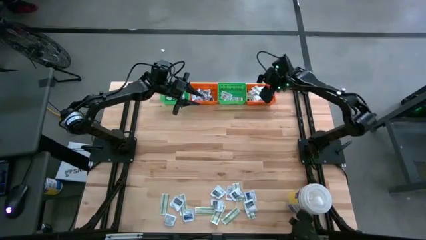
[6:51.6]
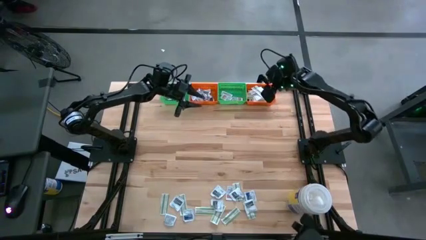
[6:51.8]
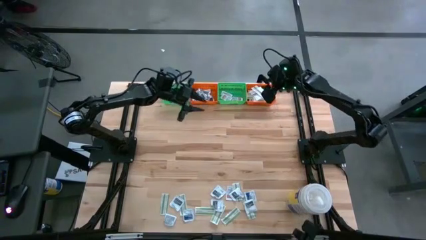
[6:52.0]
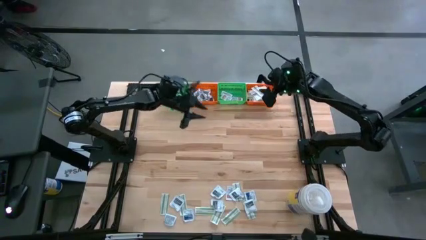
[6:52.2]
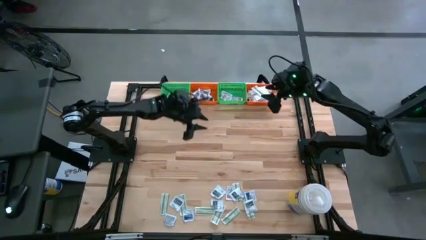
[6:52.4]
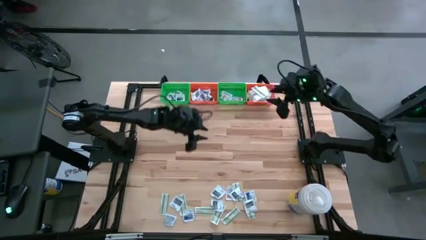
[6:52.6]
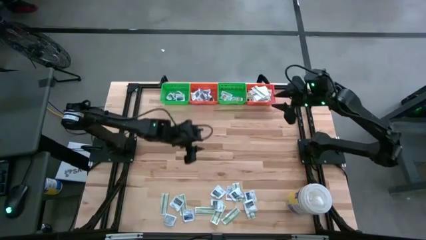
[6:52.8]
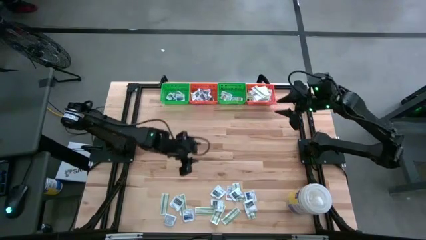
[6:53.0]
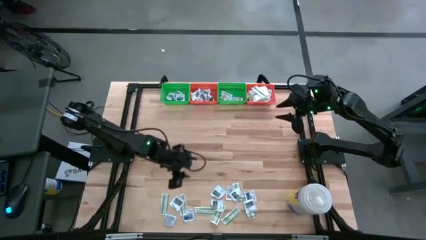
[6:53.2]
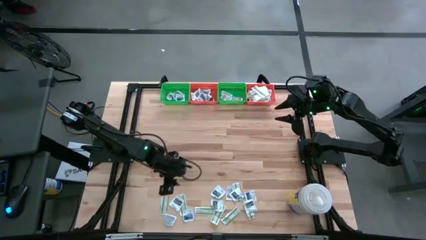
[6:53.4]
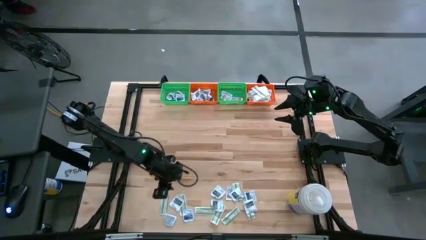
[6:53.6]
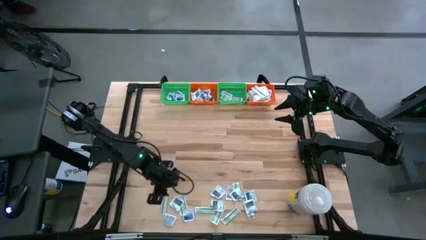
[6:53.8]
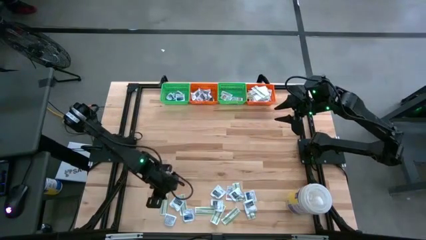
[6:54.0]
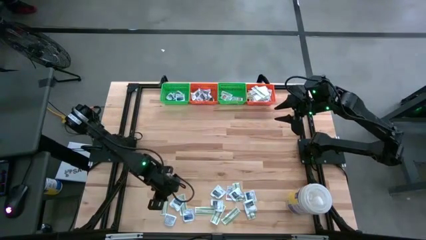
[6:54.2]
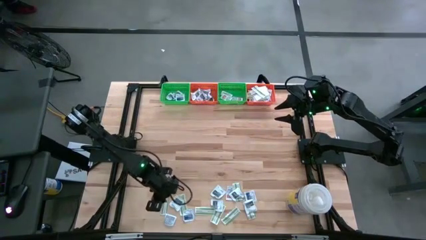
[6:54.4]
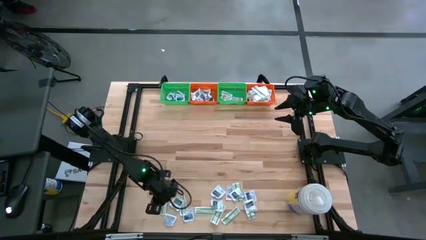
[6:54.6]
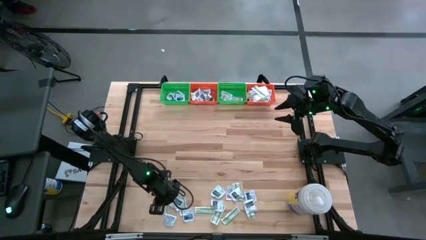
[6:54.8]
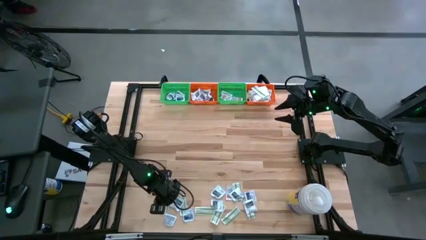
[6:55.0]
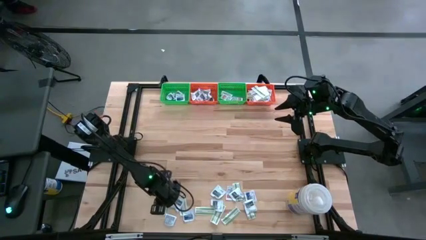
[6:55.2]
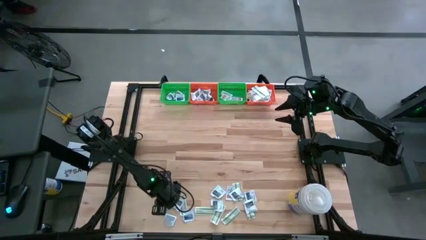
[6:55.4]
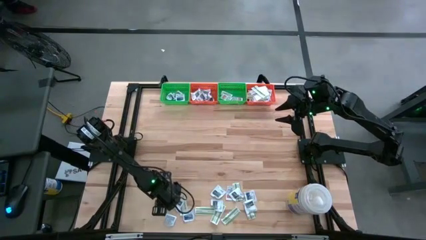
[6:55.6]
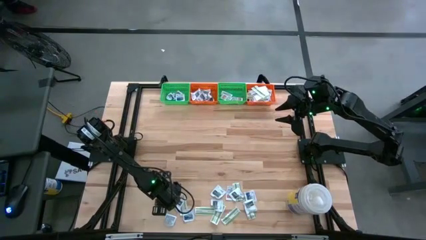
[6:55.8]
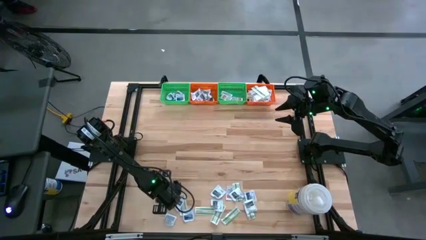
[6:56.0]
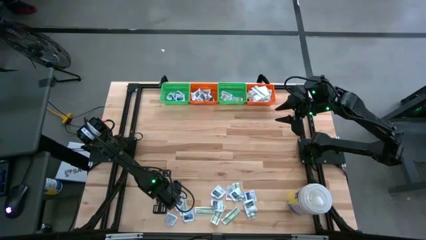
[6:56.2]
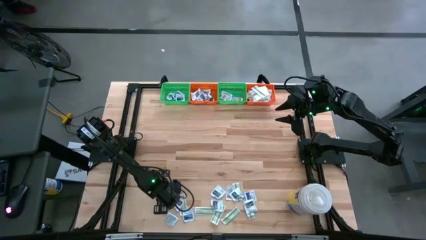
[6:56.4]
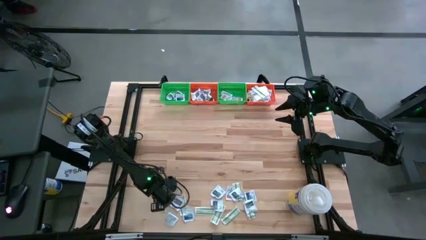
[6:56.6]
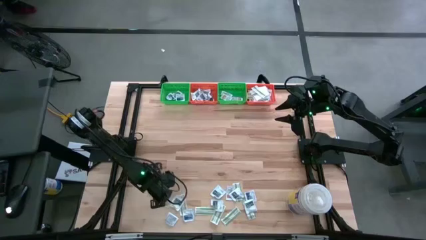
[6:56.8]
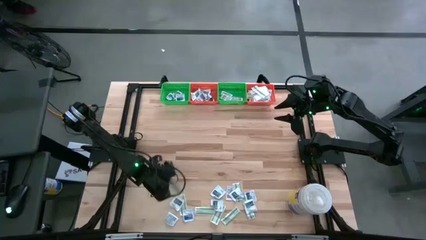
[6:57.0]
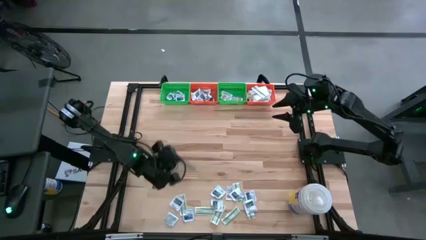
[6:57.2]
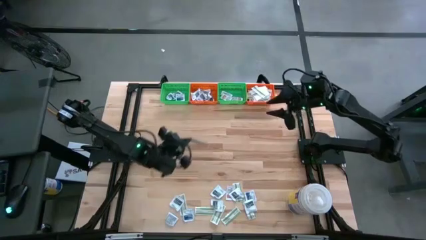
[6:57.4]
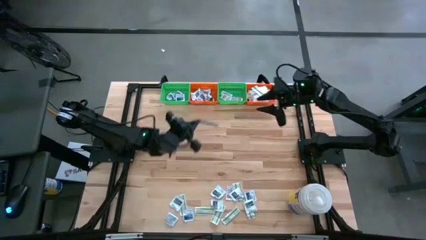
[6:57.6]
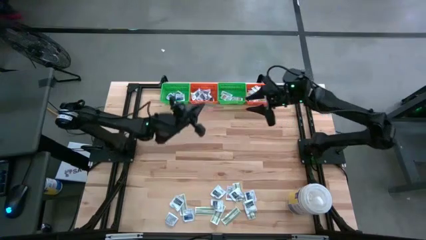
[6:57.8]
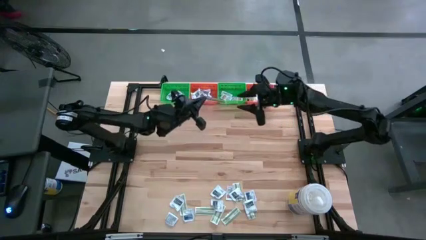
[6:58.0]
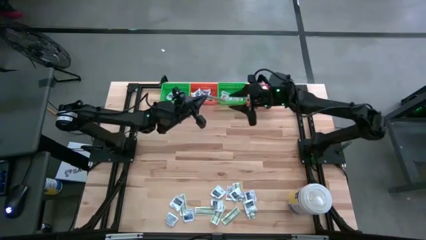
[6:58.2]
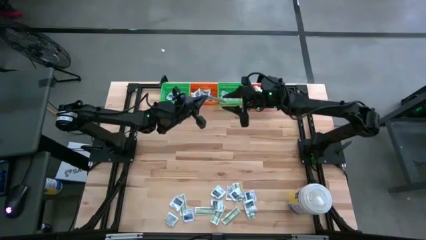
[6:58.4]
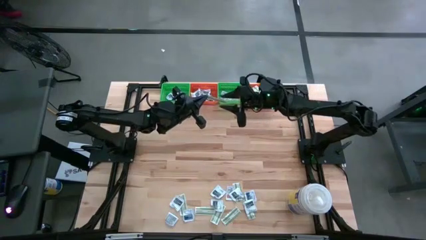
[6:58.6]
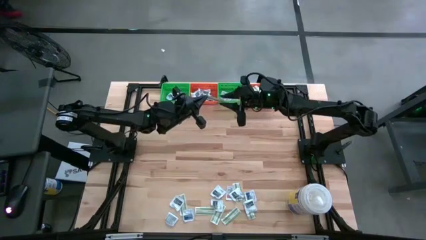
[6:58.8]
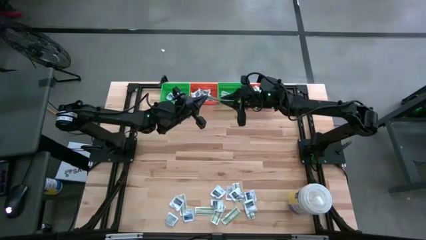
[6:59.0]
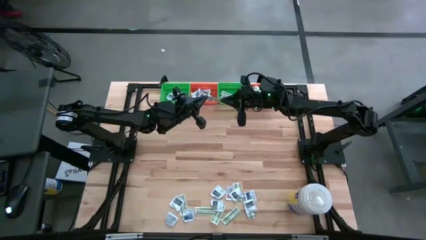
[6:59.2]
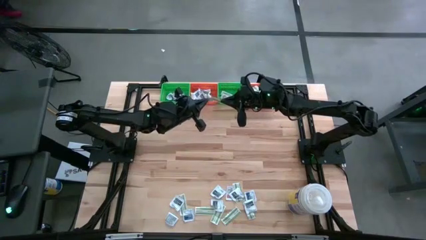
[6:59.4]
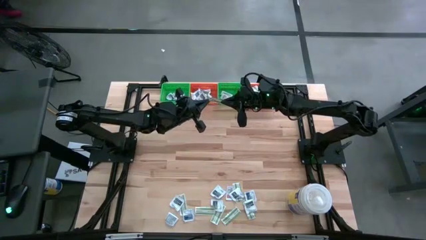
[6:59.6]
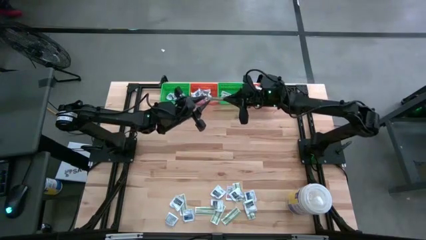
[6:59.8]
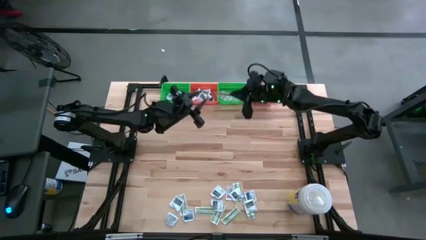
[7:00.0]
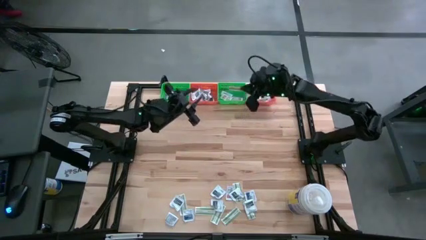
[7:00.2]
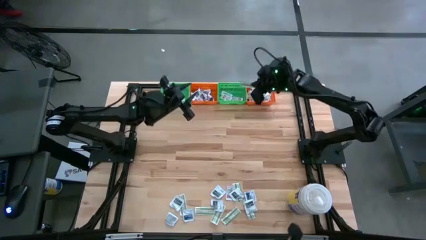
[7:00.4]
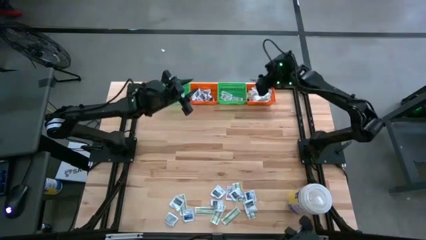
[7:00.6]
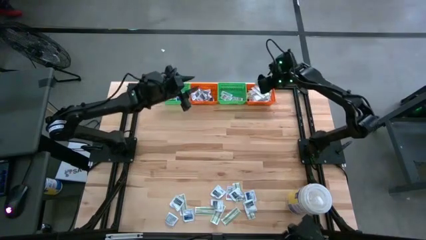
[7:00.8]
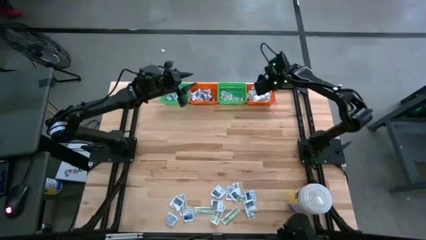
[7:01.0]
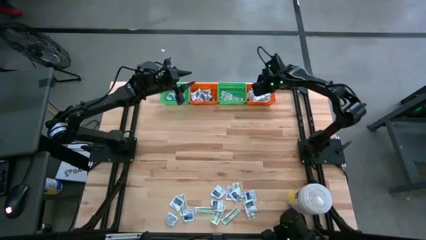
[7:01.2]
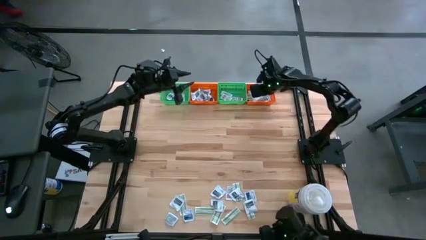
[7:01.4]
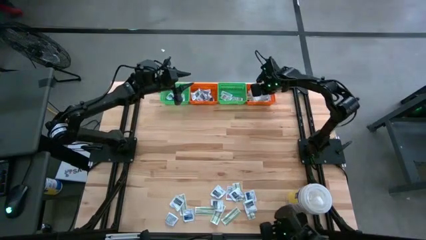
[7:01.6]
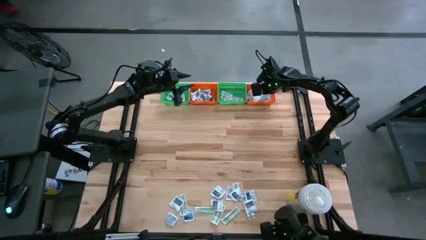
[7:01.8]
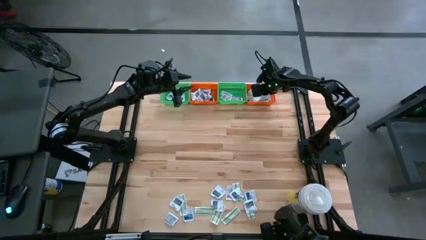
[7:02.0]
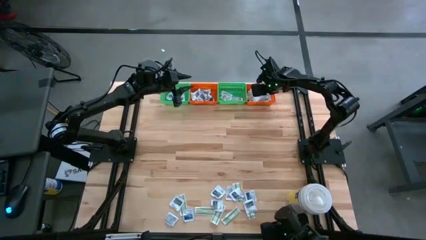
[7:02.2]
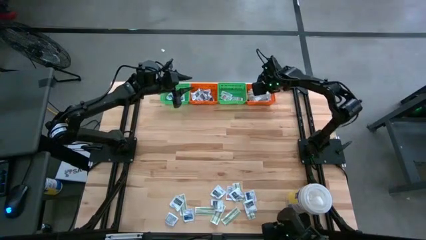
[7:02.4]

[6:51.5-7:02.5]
Task: Pick & Place First Aid Supplies
Put the green bandage pack in the right orange bin

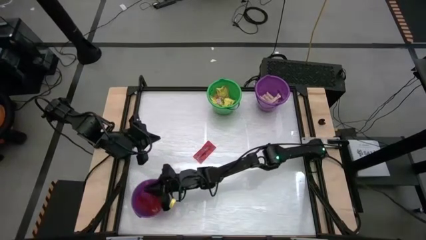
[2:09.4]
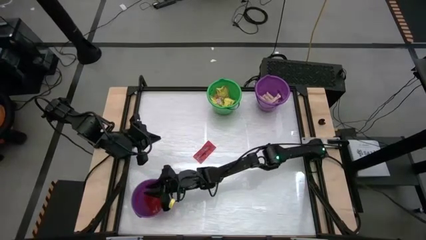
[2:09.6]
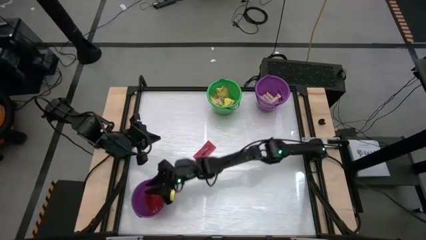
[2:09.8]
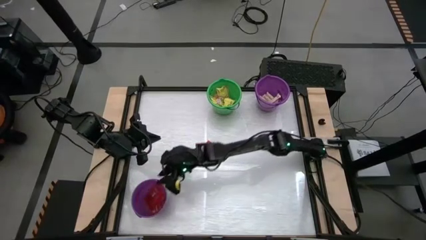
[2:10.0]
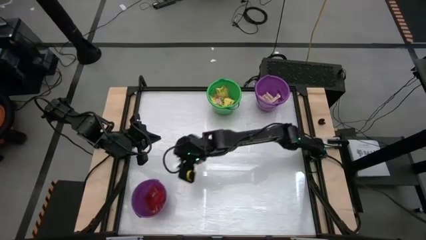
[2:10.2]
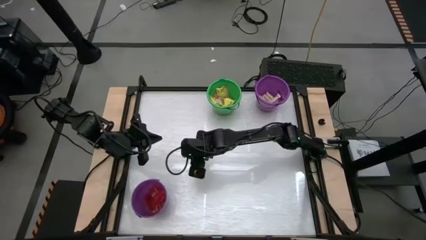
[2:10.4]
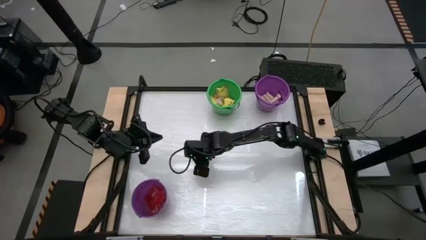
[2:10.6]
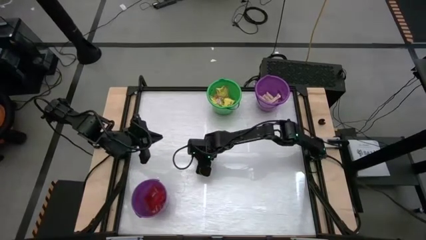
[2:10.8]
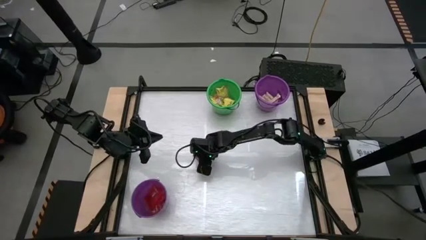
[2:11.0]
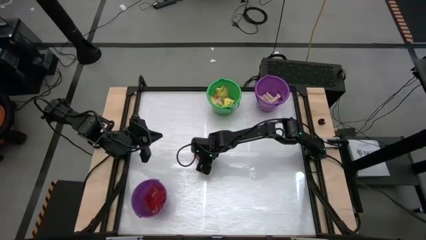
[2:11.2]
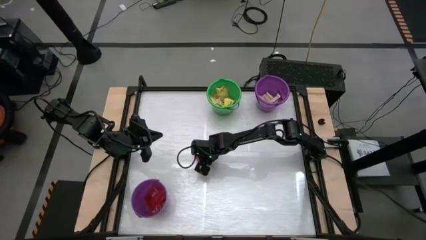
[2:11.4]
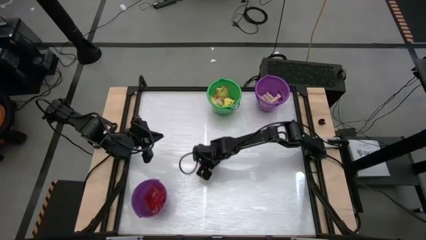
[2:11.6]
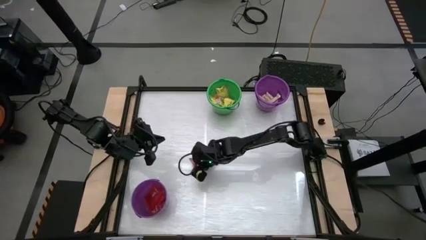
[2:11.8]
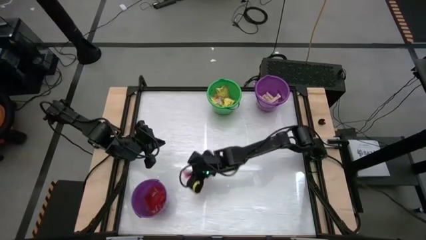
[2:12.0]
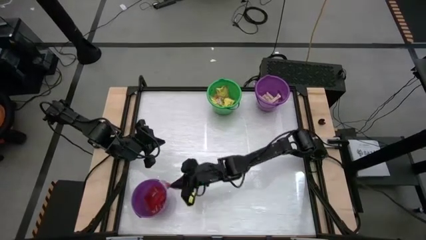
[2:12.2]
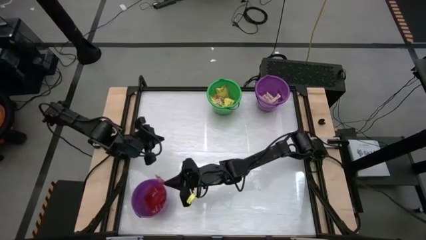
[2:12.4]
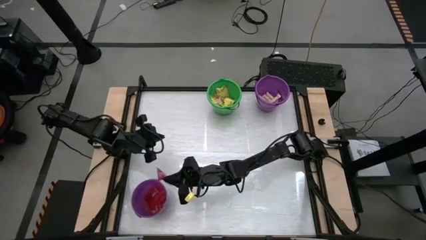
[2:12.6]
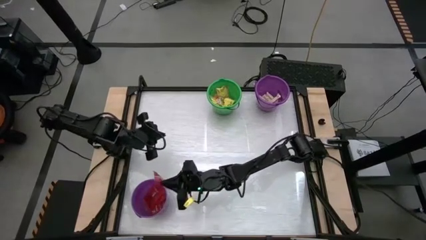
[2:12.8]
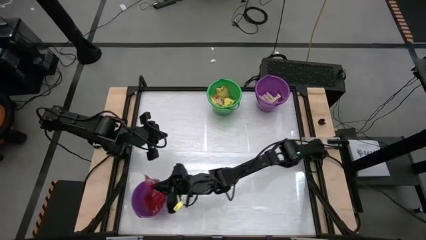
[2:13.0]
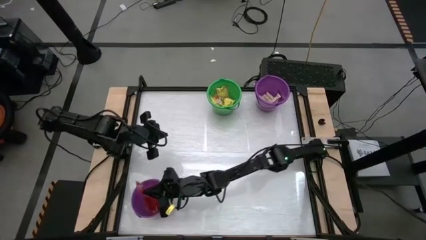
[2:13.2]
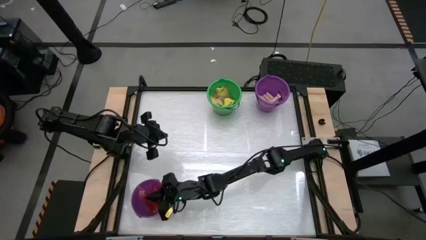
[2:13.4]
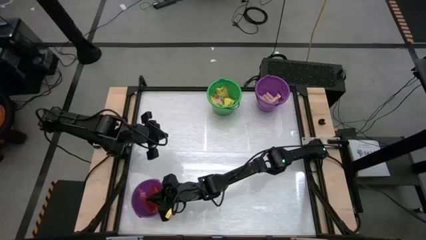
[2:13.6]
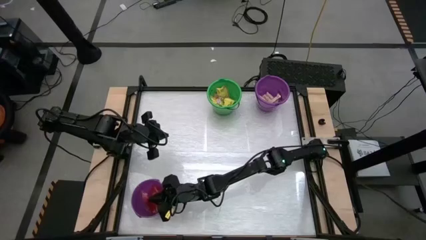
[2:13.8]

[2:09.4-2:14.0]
Task: Sort candy by brand, put in halloween buckets
Put the red candy into the bottom violet bucket
